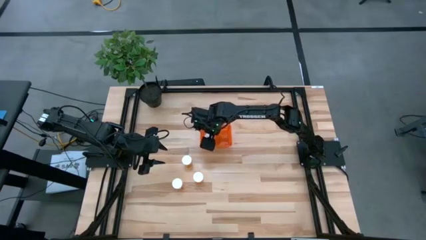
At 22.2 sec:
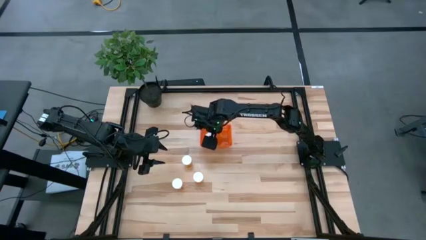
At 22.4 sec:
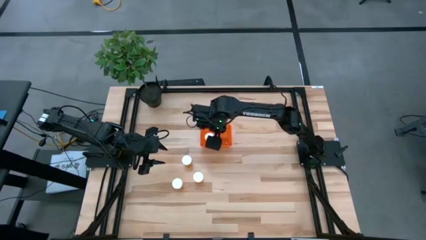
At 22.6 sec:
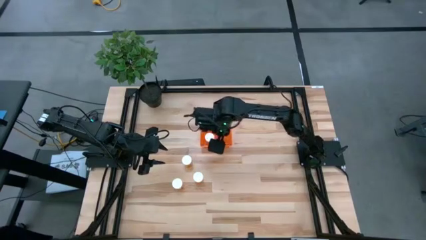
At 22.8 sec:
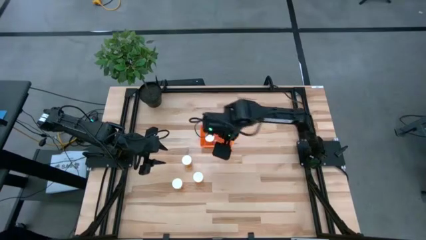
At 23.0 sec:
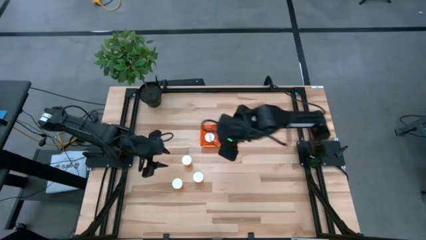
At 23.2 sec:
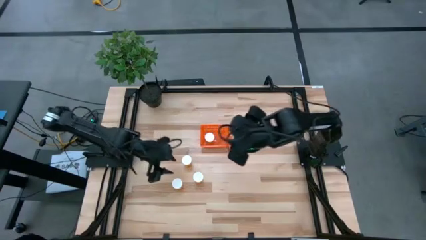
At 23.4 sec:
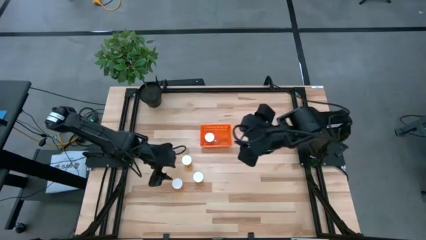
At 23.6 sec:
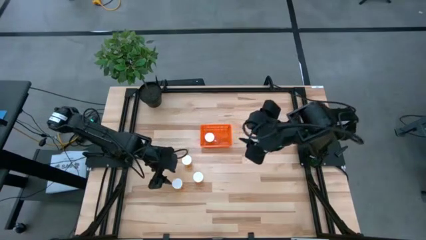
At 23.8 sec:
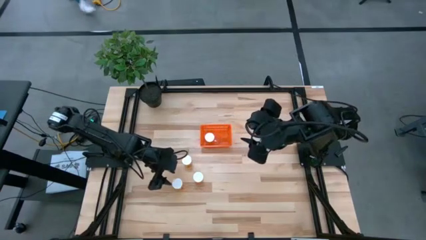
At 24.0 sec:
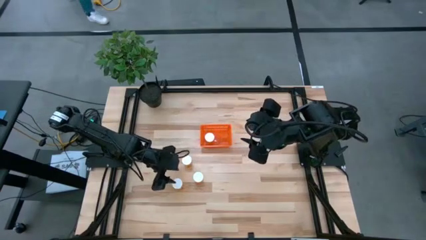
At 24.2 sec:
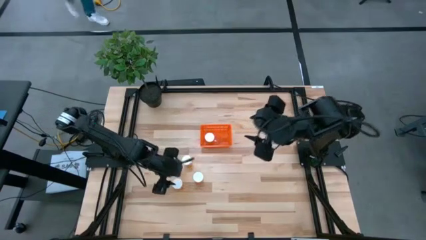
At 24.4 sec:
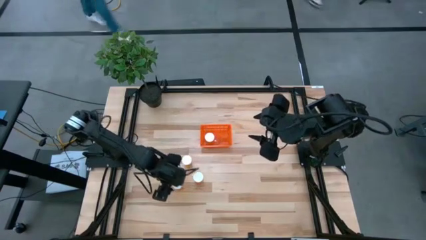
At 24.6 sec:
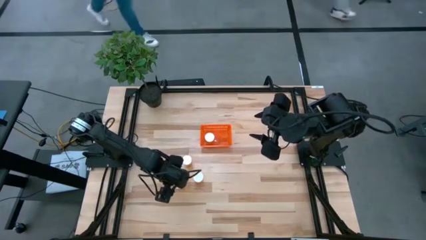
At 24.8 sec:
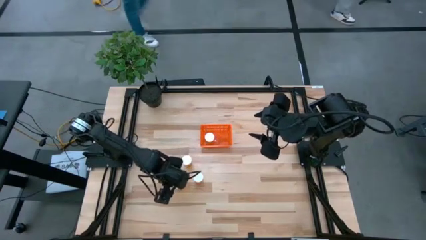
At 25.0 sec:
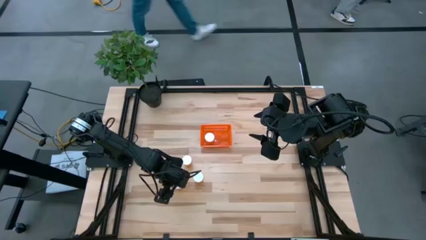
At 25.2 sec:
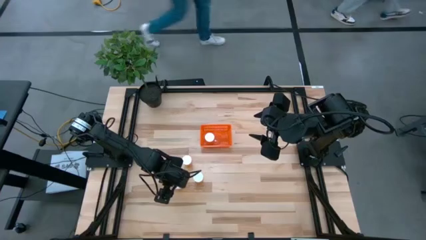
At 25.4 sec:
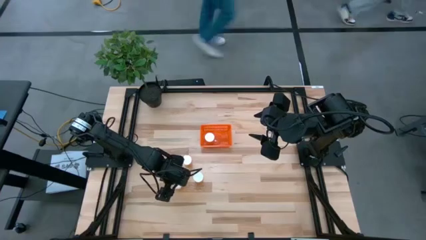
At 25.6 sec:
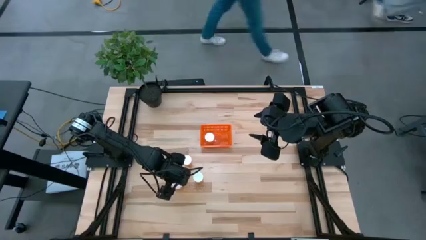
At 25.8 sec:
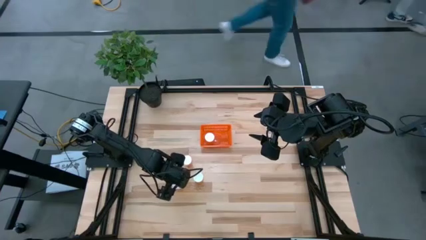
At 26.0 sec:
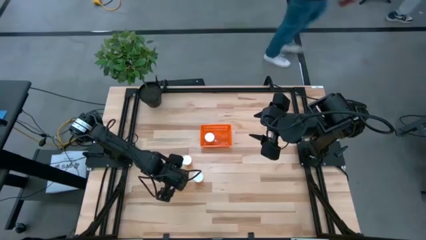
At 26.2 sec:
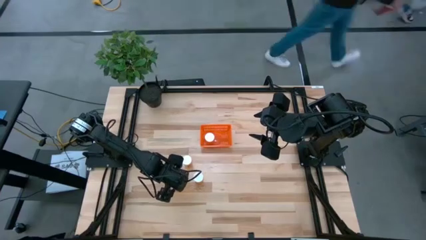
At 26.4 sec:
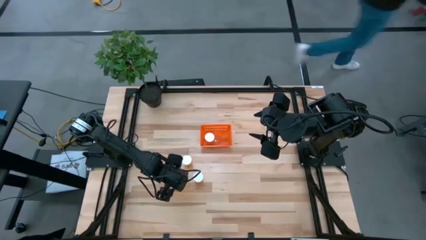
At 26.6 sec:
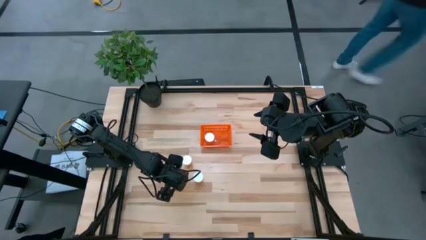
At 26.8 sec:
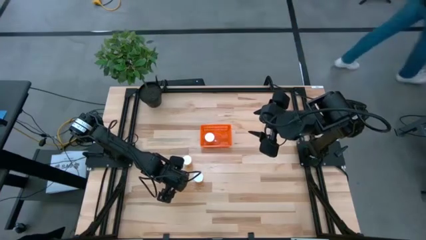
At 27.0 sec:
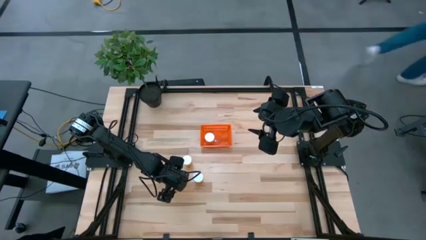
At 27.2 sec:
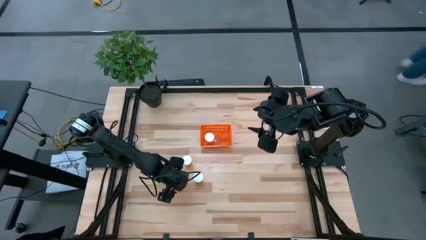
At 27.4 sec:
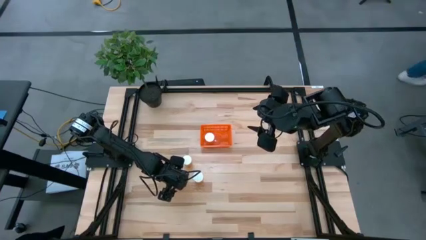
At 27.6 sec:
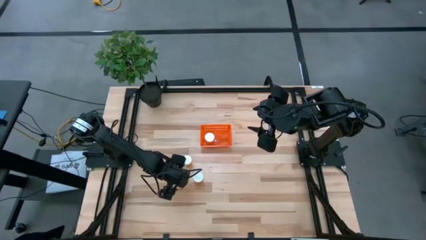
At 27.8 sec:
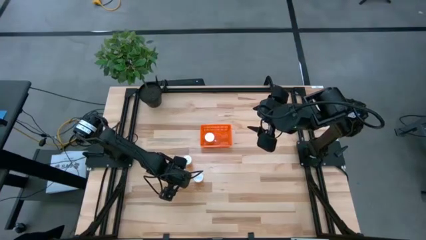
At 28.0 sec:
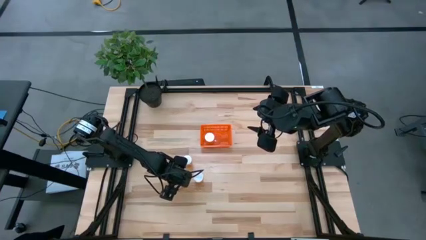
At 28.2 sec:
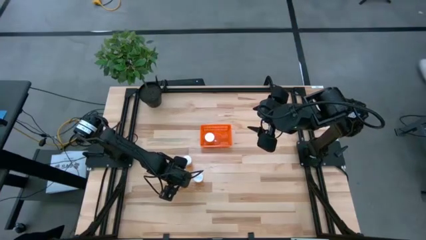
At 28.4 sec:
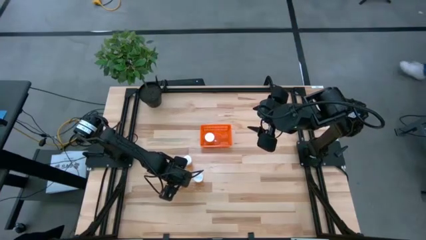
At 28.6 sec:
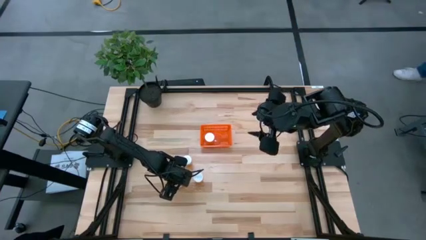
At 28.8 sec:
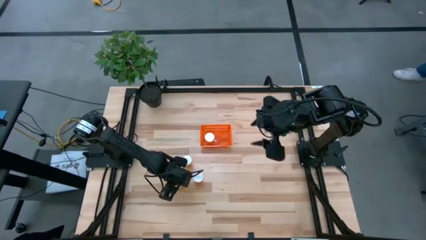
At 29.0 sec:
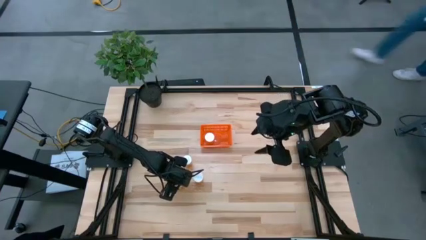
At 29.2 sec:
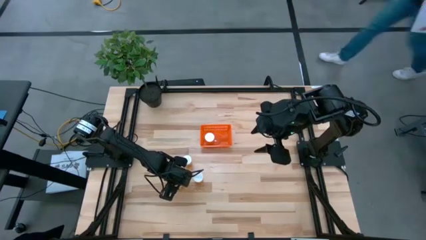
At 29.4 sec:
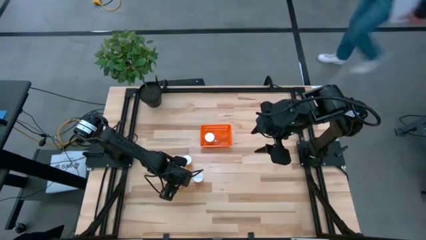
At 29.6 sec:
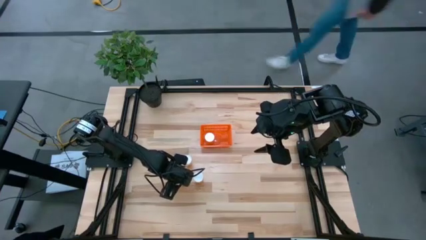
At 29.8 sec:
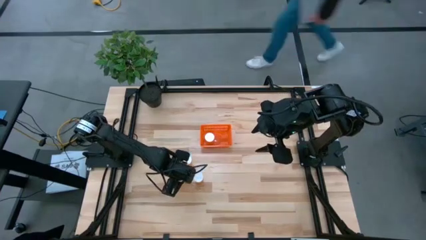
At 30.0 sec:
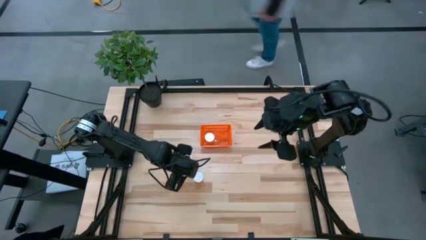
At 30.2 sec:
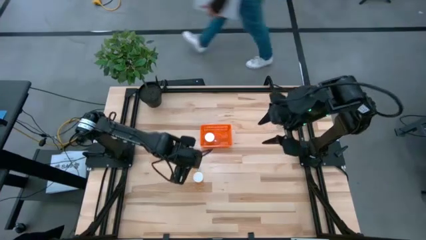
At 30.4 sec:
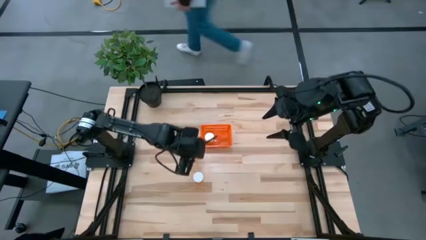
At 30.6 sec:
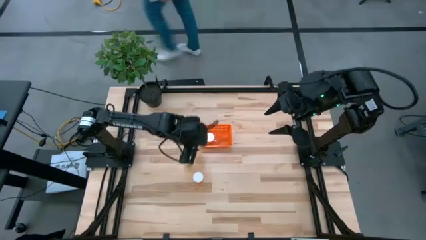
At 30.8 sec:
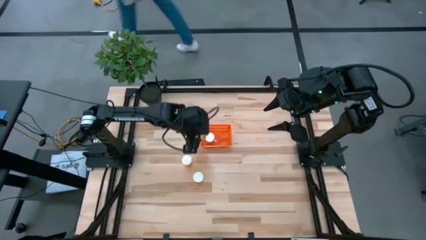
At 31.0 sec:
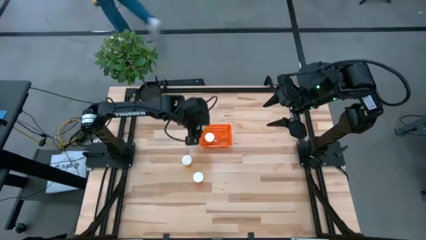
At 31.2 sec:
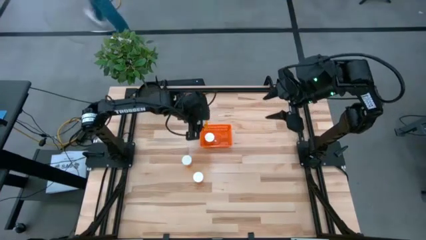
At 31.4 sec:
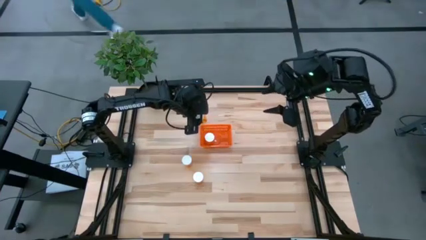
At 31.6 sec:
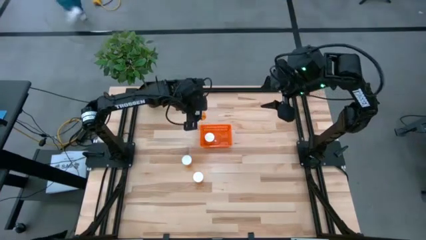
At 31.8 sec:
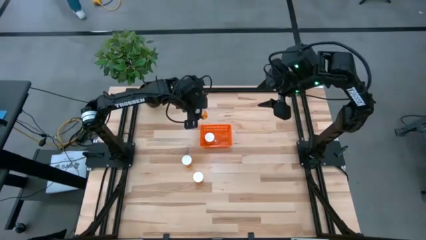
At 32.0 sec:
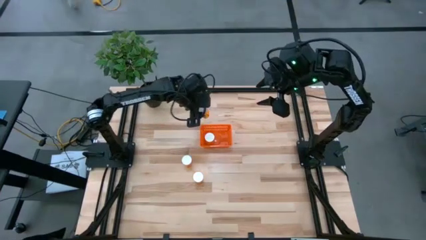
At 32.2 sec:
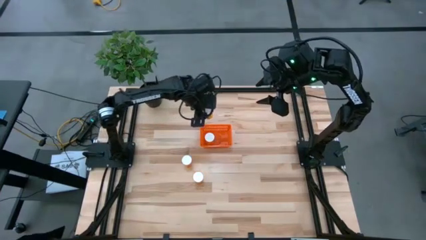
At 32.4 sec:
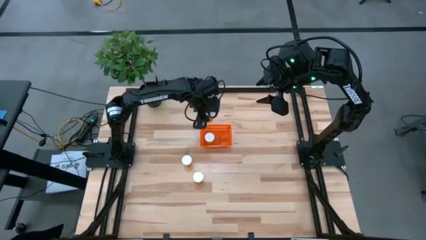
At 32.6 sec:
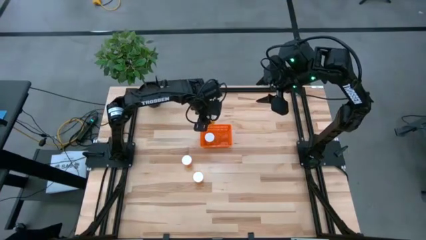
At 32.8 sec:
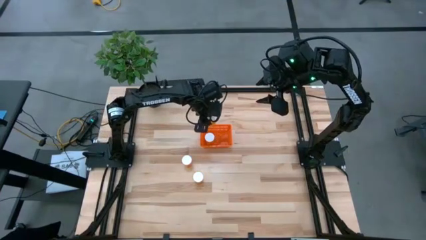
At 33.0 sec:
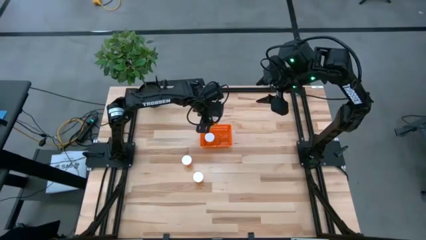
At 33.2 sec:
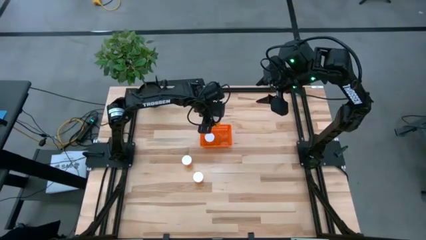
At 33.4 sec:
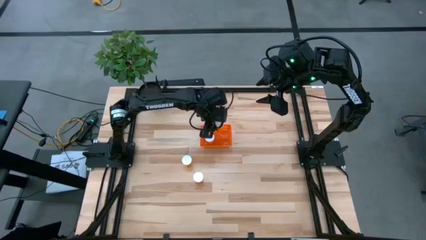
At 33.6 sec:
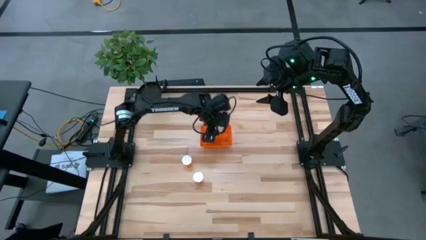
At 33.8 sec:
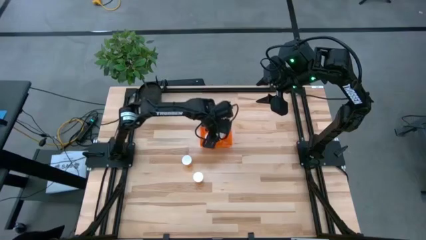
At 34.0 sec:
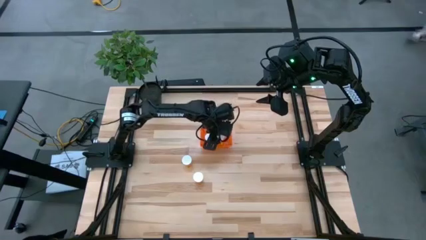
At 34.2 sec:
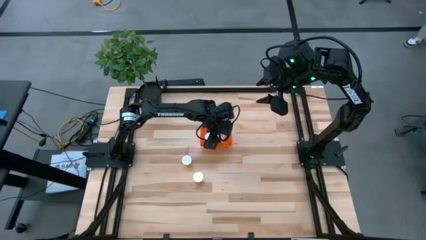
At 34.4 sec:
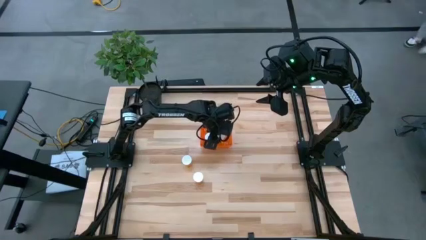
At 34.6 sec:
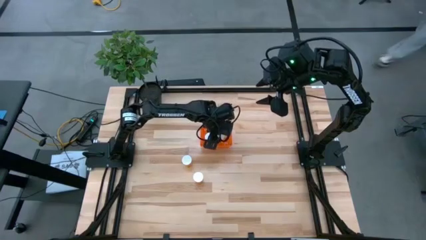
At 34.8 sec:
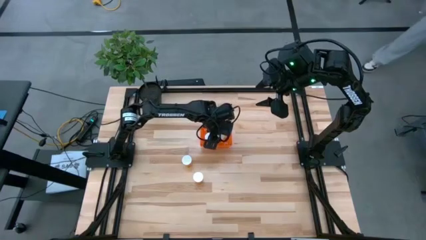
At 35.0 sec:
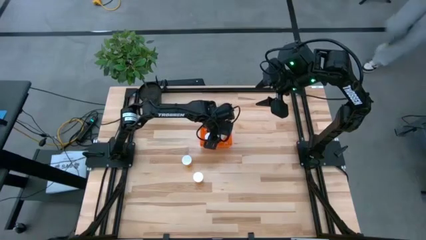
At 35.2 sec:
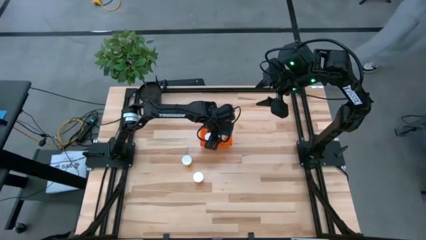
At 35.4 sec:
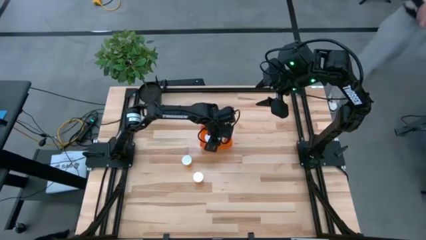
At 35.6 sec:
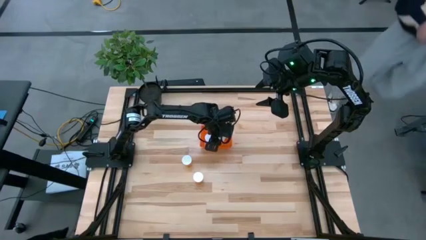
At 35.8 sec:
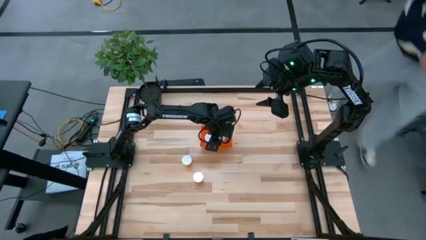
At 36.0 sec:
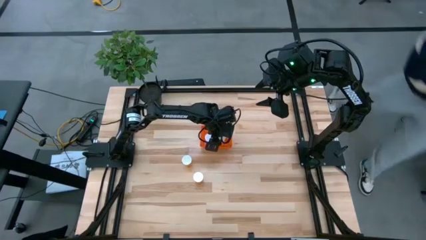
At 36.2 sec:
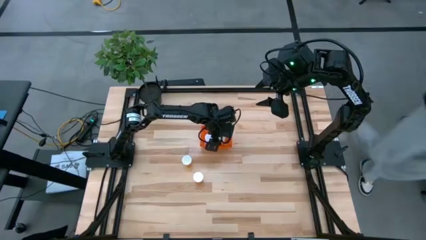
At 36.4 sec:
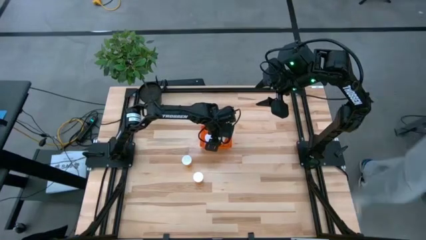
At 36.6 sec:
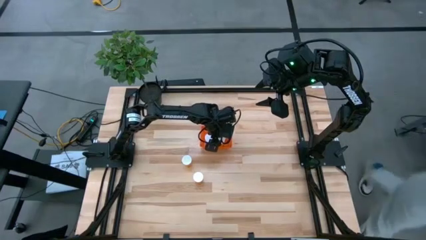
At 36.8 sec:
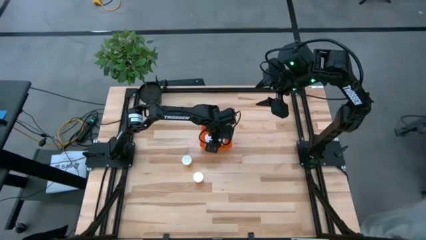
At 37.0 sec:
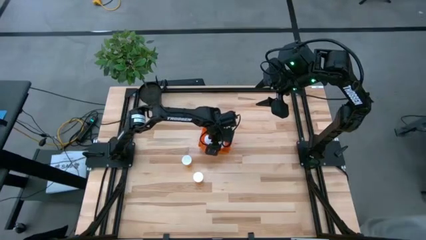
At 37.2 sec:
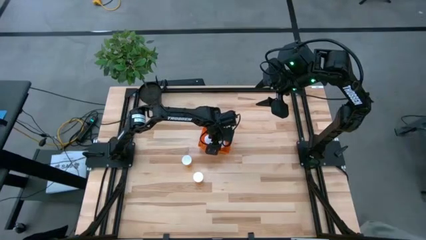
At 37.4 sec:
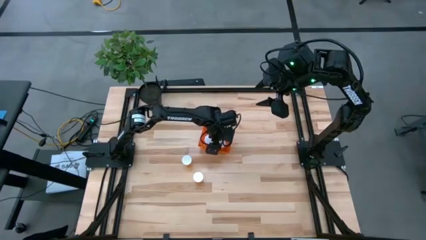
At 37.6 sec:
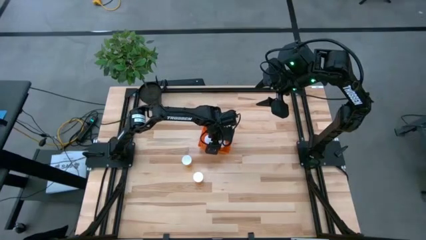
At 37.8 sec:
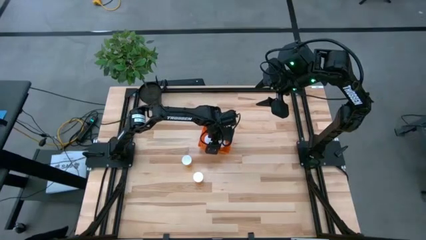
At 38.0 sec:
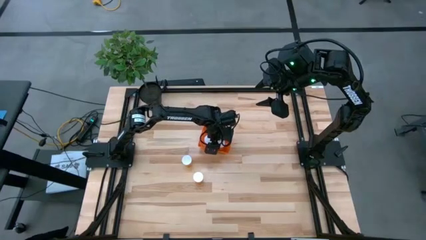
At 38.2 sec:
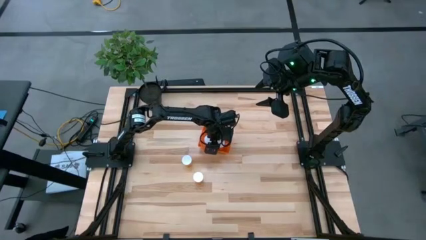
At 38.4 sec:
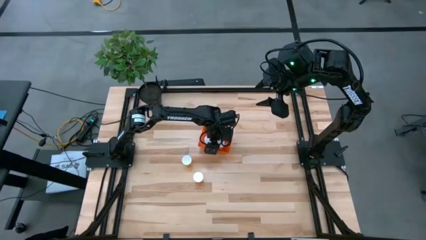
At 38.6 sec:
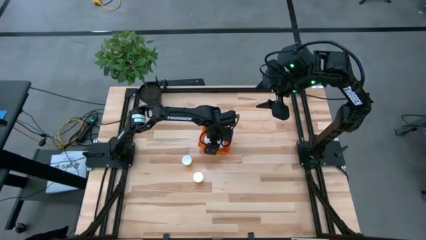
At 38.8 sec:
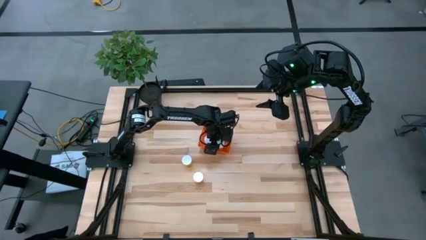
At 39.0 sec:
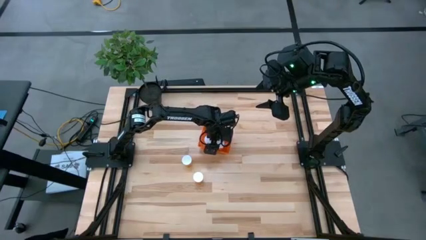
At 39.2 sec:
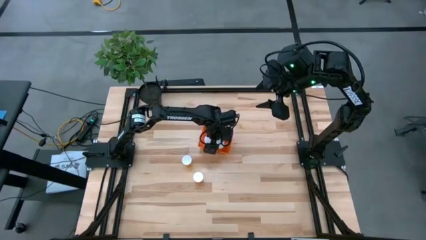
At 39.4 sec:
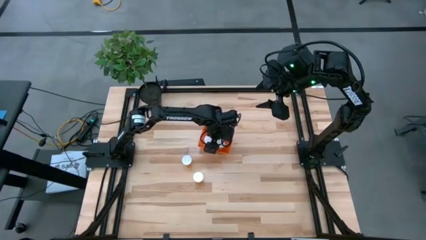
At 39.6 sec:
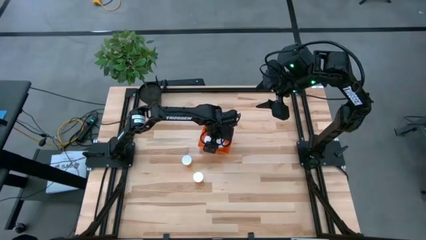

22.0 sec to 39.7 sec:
Task: Pick and place pill bottles into a basket
Put the orange pill bottle into the orange basket
